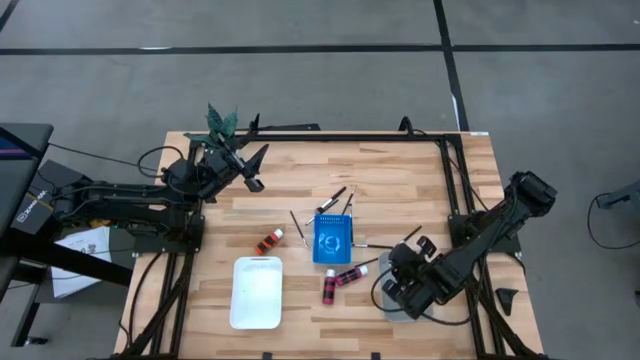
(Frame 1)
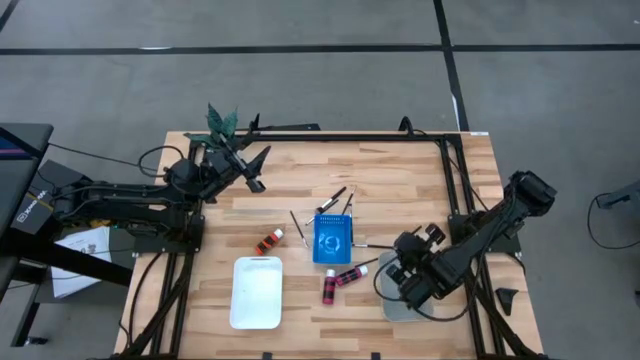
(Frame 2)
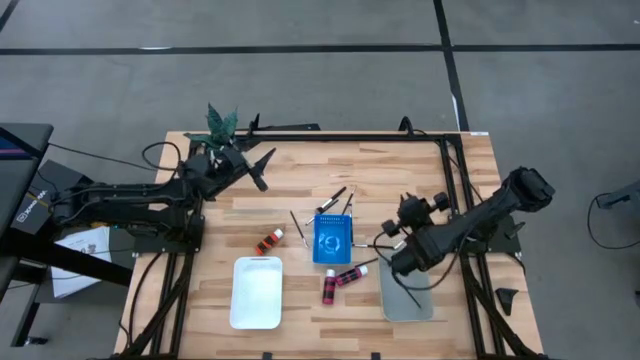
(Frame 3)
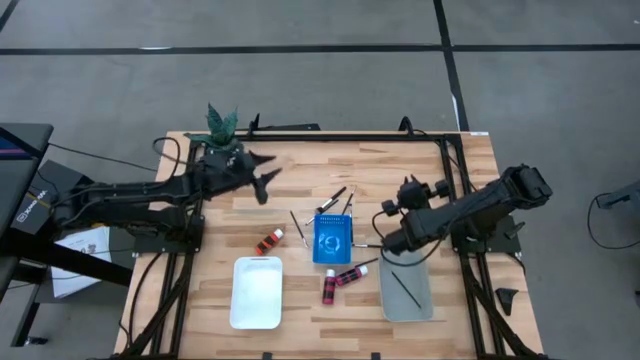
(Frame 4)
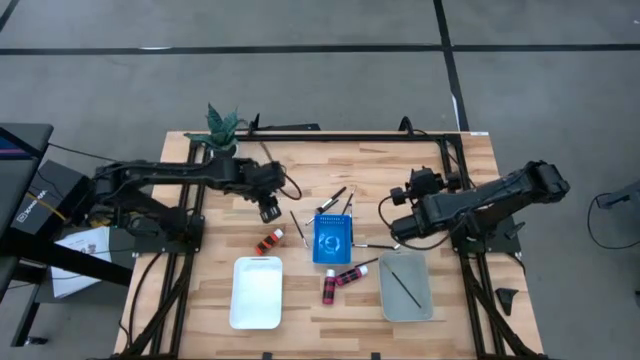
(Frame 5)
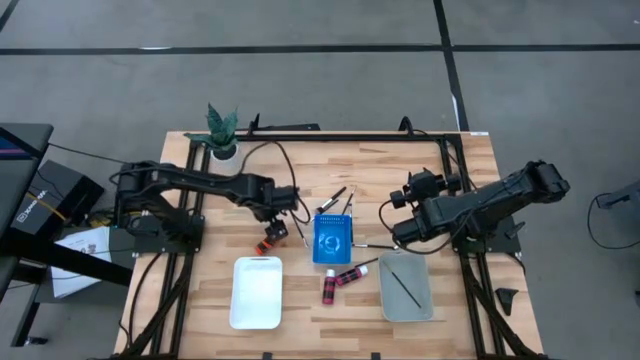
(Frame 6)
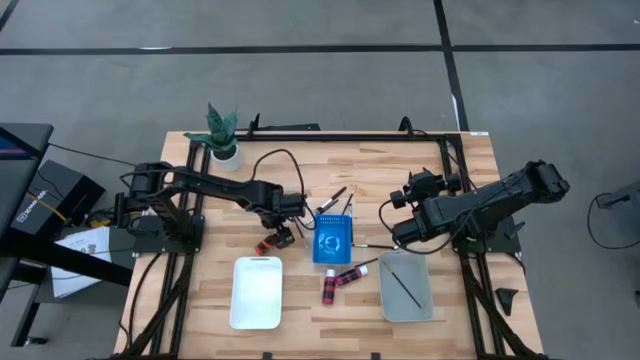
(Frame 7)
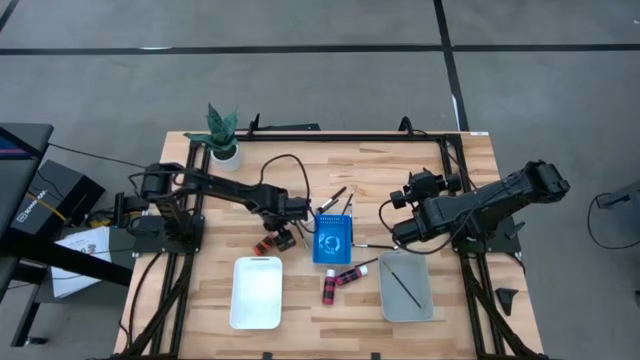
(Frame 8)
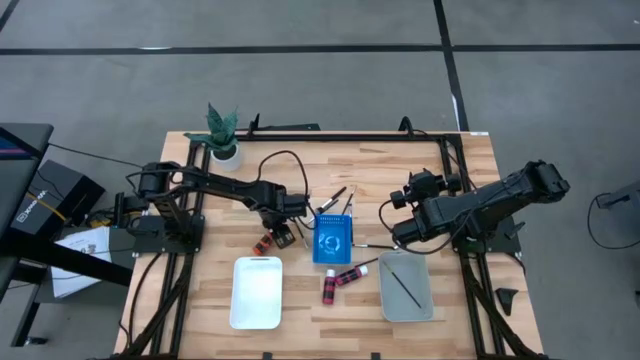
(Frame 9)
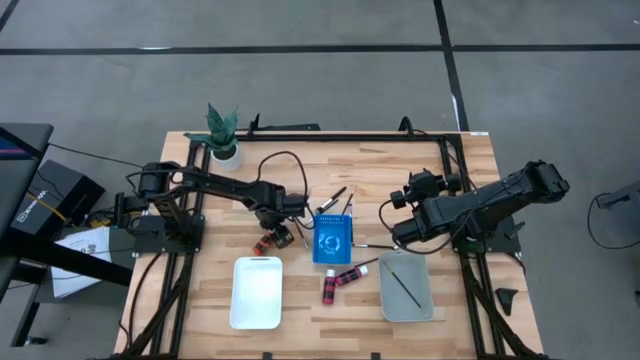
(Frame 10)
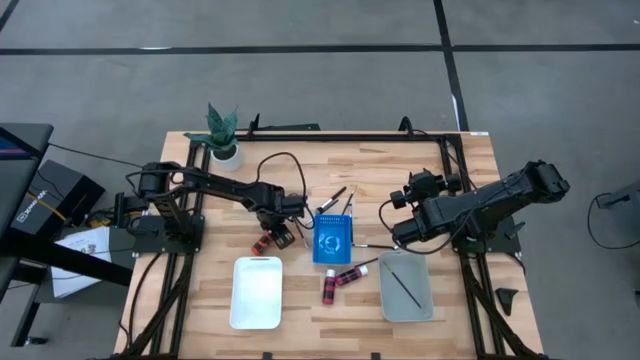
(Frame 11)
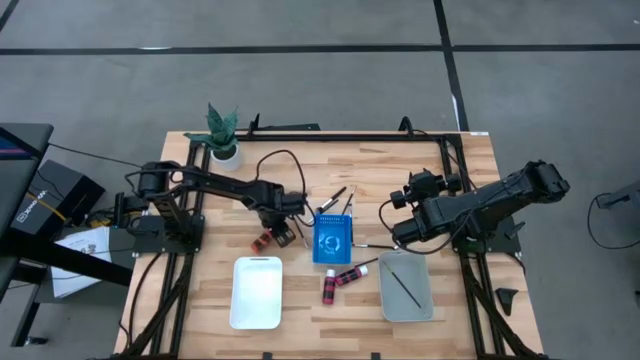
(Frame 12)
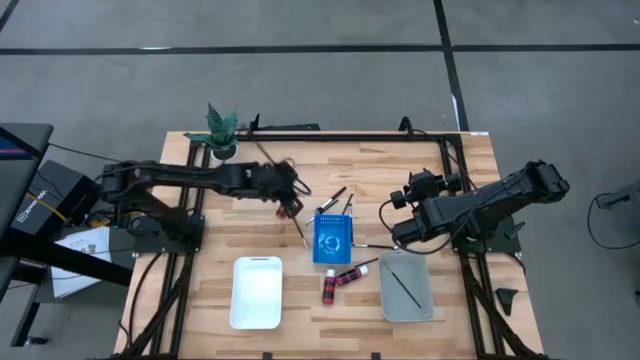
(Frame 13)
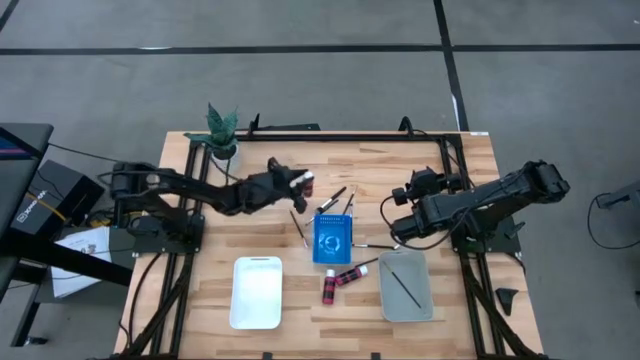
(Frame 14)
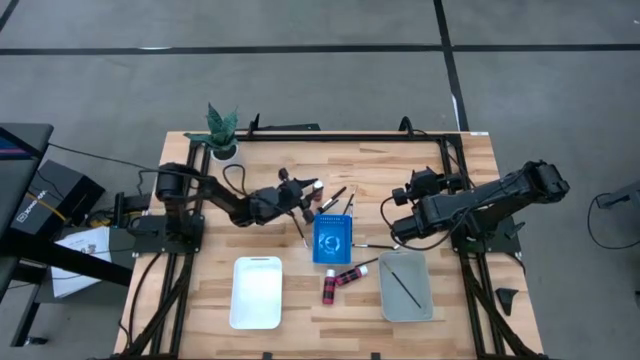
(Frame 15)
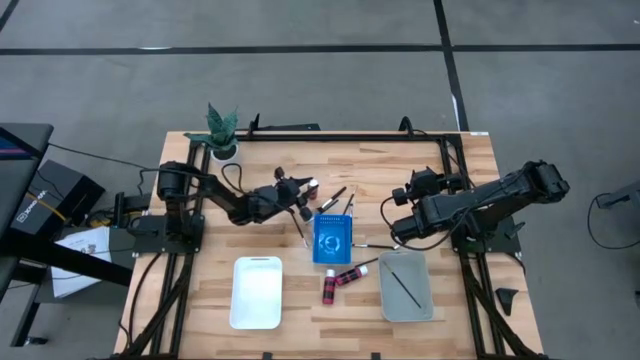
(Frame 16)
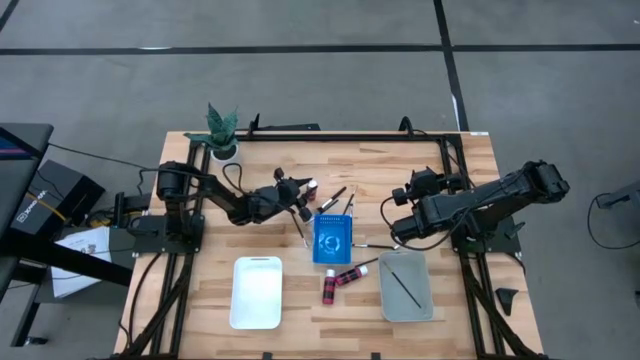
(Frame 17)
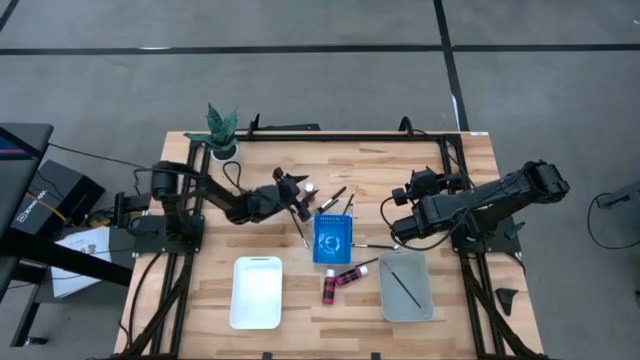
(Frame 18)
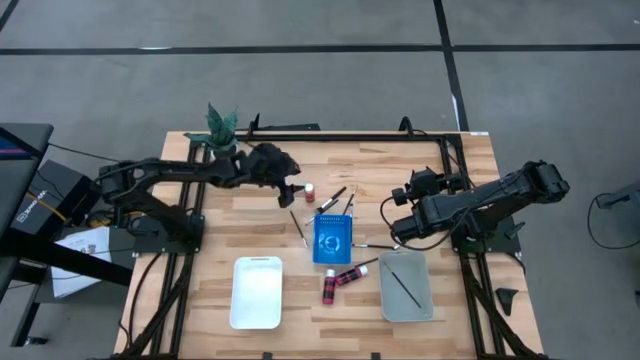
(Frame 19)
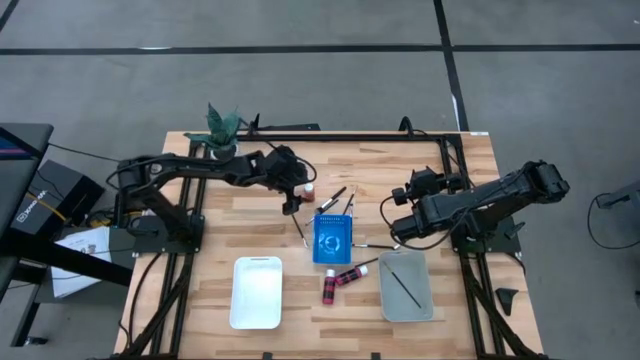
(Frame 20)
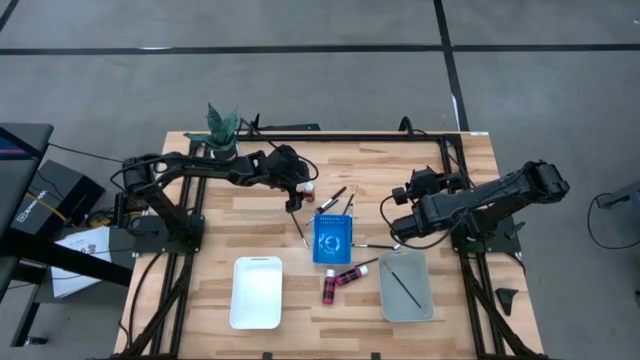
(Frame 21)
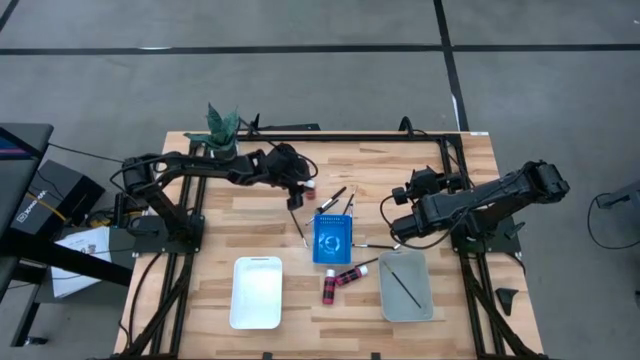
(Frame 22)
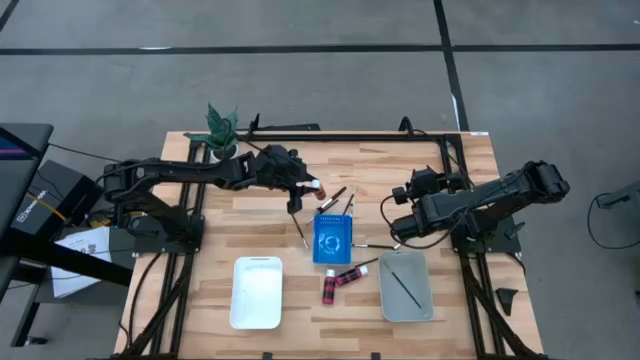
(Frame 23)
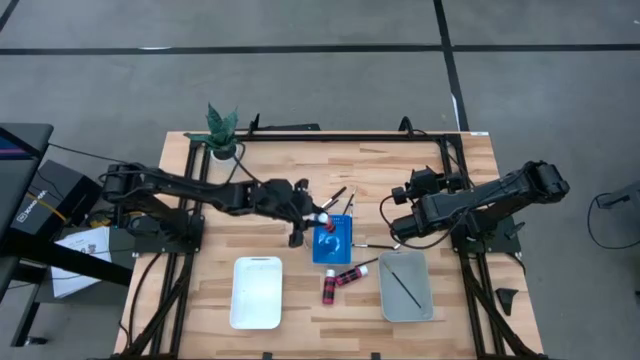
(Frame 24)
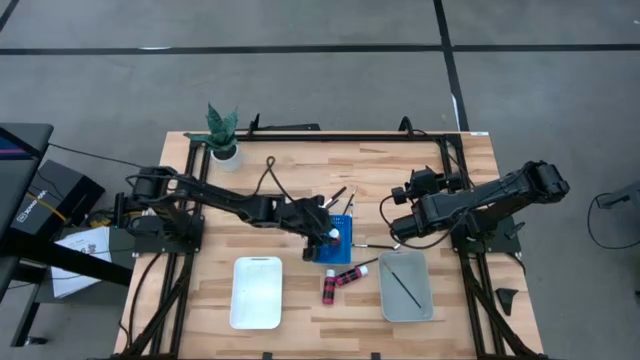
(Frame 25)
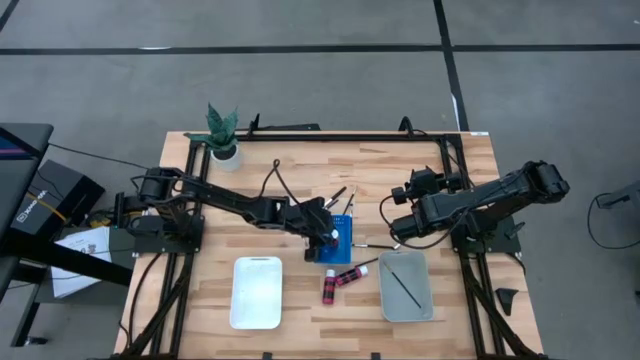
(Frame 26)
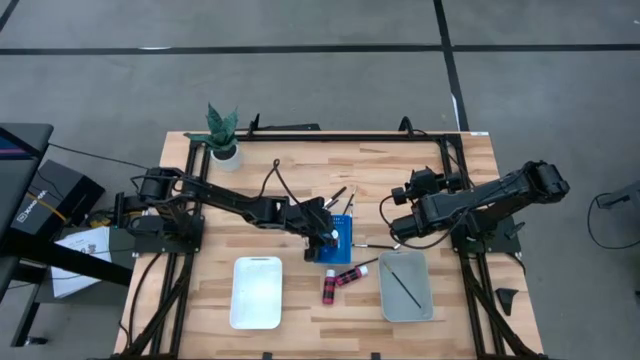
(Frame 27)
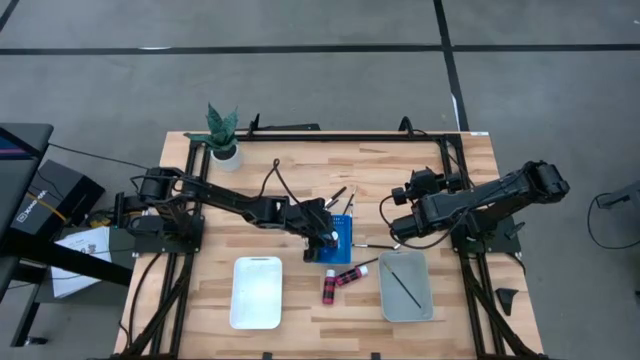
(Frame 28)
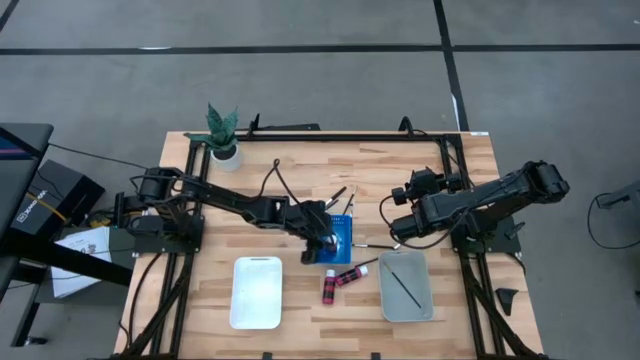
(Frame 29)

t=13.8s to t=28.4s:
Task: Pick & Place Paint Supplies
Put the orange paint bottle into the blue bin

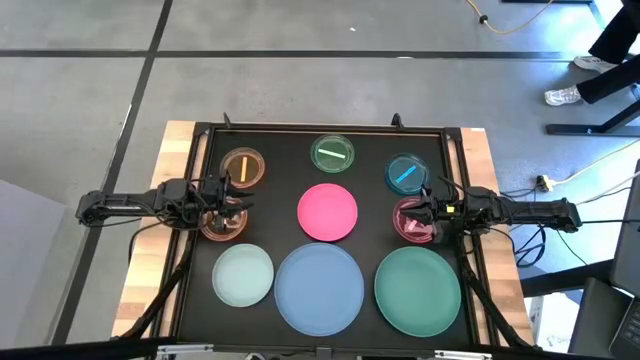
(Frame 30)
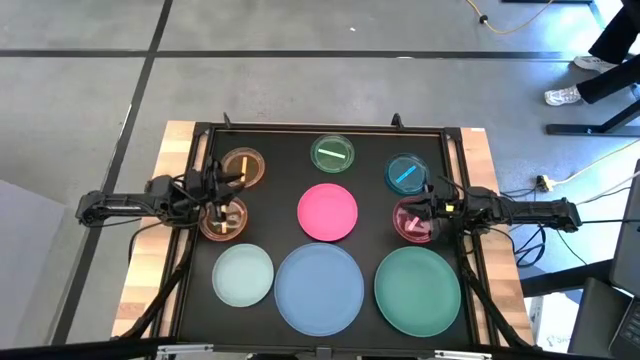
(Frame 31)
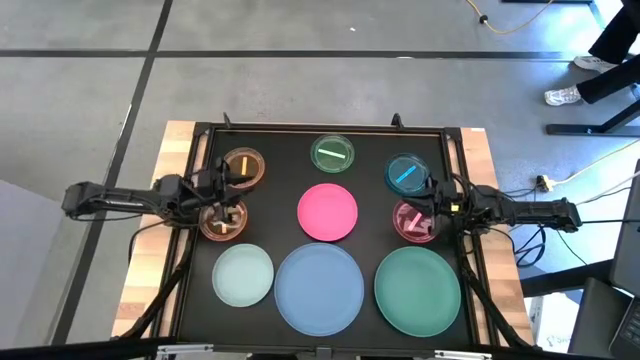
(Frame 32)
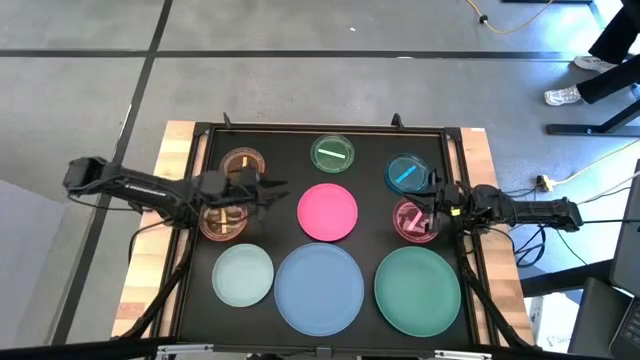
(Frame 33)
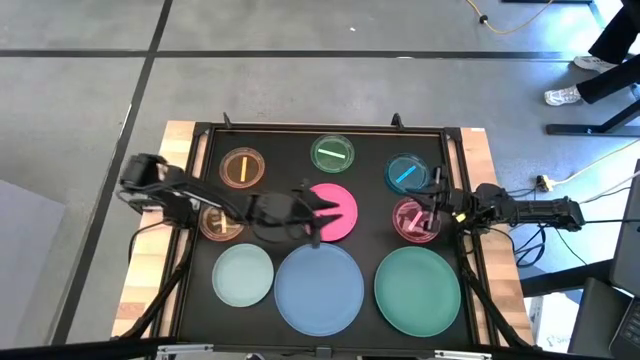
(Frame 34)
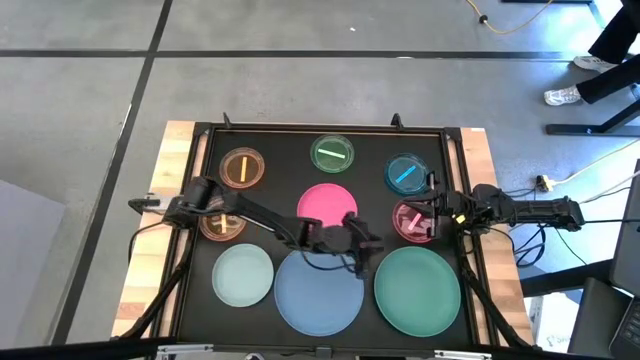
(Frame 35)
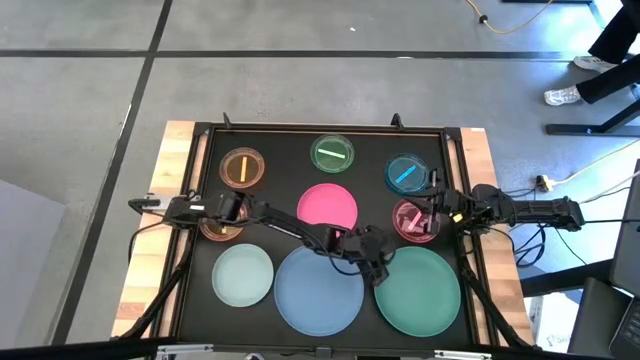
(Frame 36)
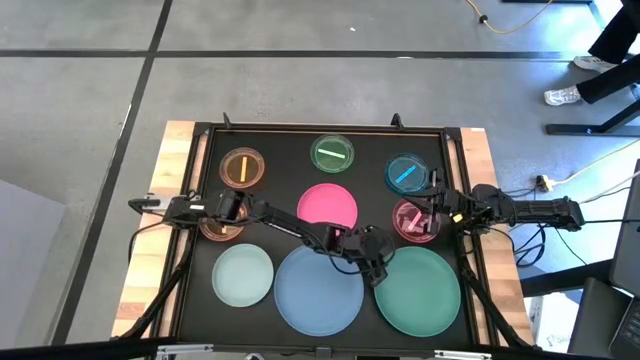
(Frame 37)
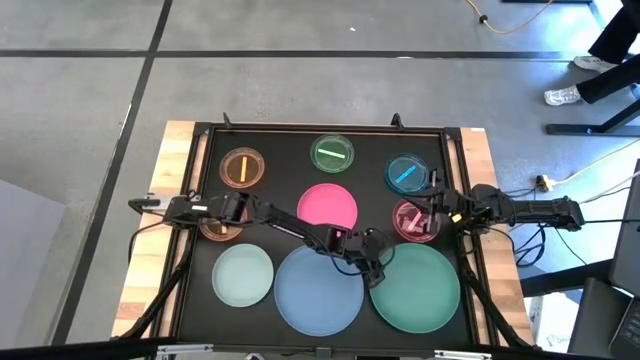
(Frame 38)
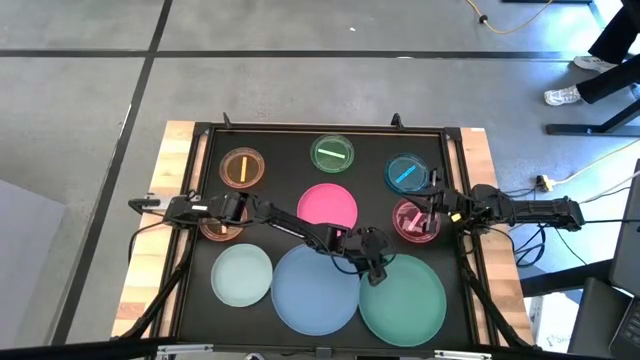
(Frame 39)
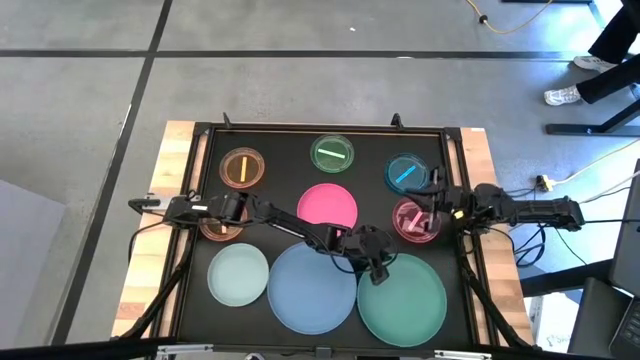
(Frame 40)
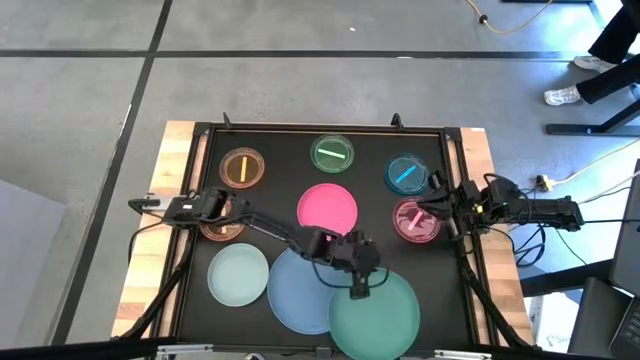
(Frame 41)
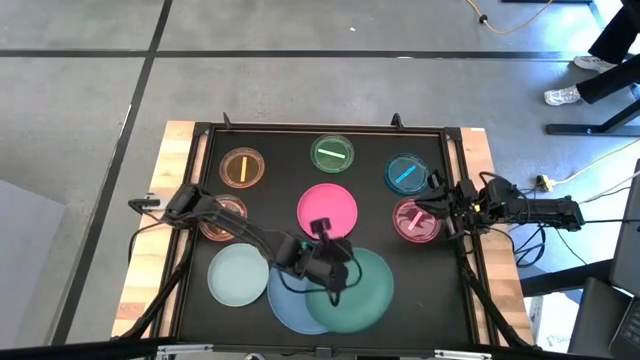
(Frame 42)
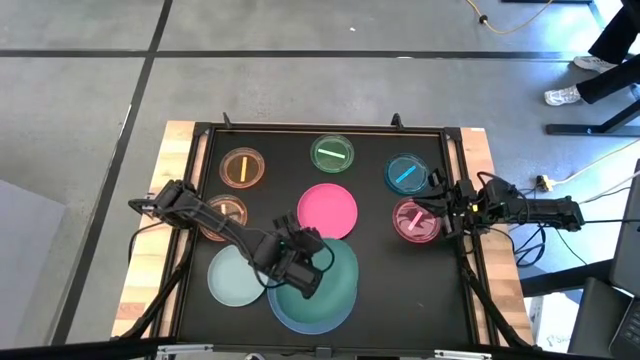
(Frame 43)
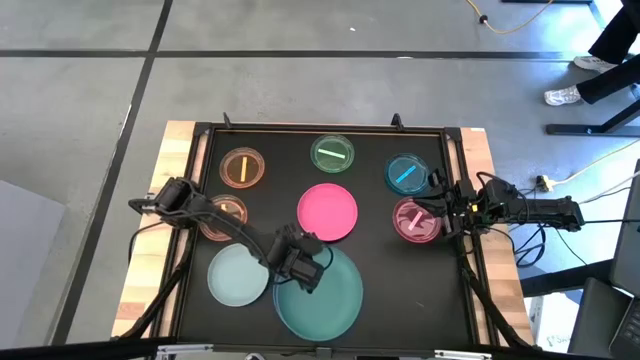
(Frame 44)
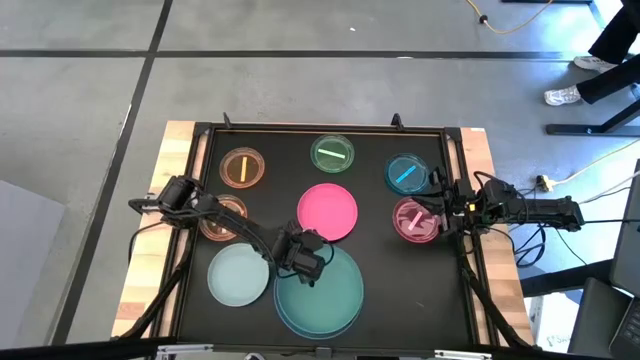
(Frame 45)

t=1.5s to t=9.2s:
Task: Stack plastic plates
Stack the dark green plate on the dark blue plate
